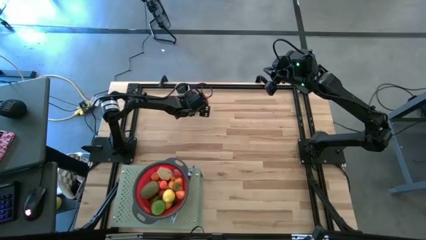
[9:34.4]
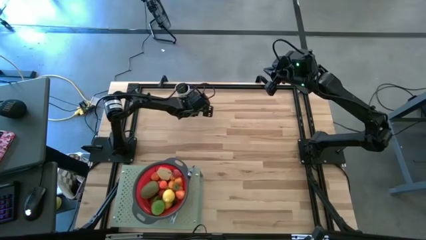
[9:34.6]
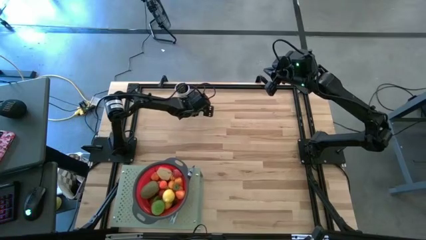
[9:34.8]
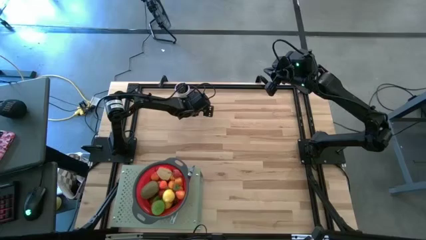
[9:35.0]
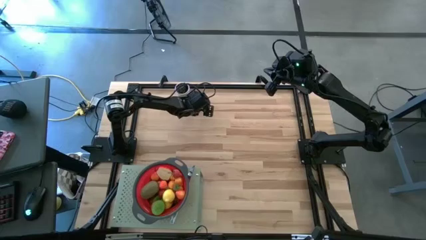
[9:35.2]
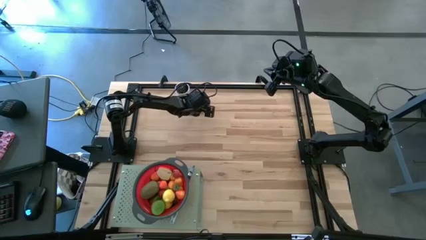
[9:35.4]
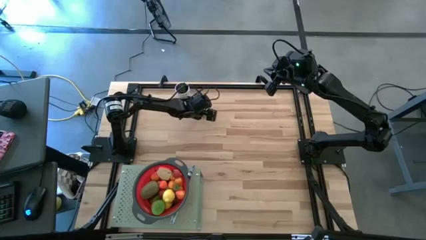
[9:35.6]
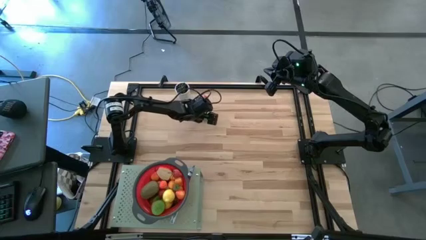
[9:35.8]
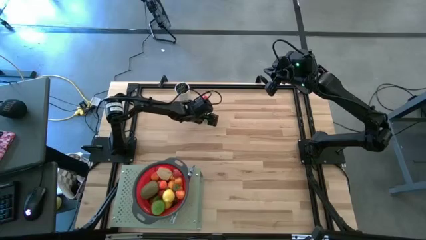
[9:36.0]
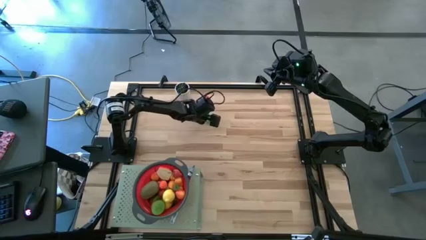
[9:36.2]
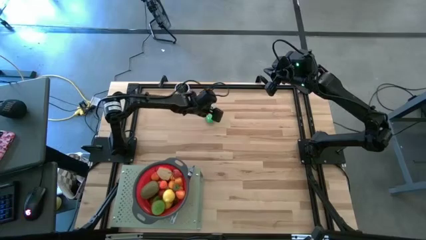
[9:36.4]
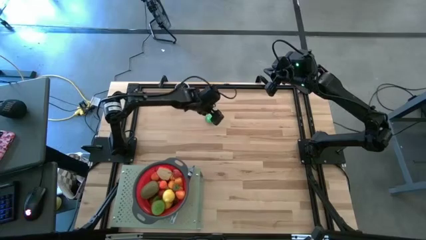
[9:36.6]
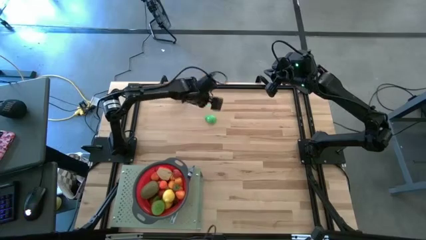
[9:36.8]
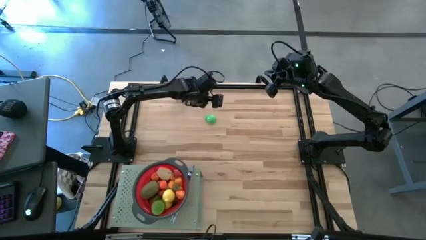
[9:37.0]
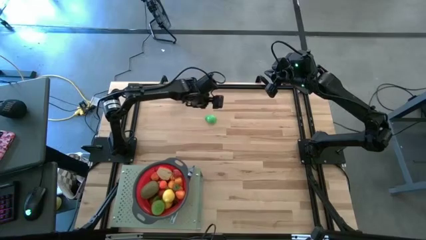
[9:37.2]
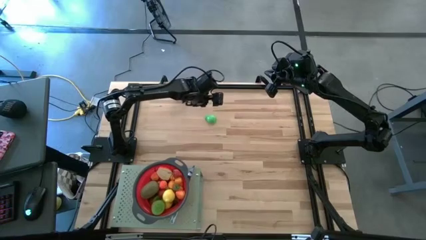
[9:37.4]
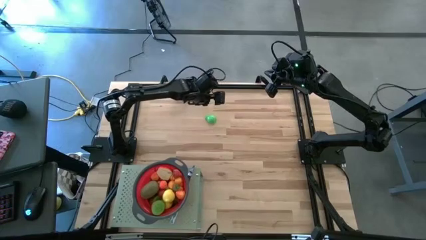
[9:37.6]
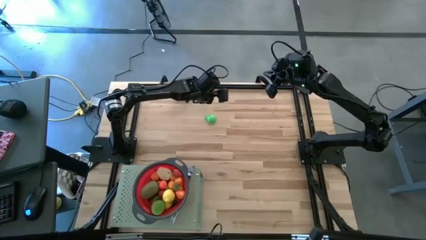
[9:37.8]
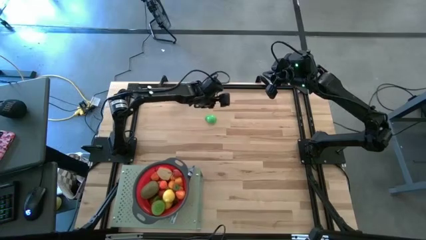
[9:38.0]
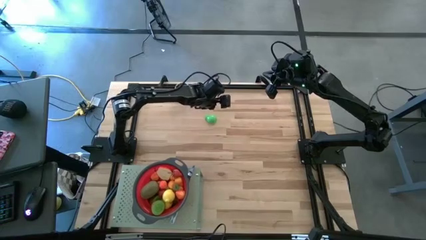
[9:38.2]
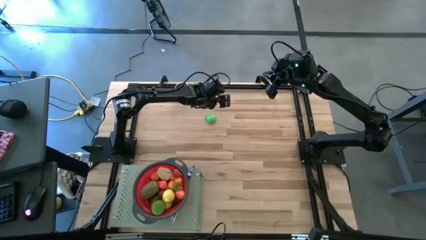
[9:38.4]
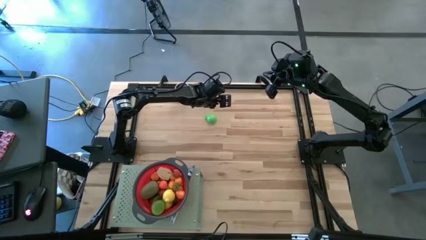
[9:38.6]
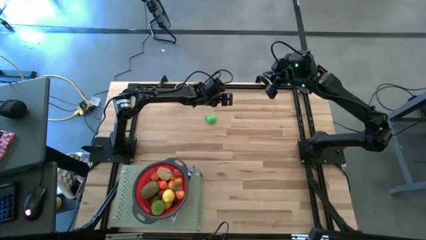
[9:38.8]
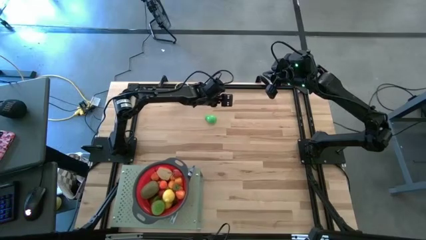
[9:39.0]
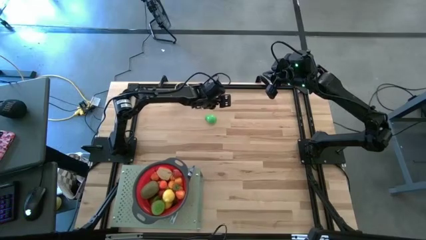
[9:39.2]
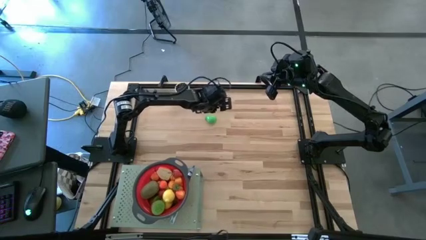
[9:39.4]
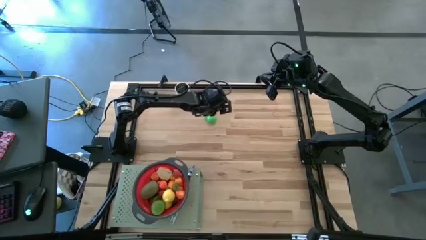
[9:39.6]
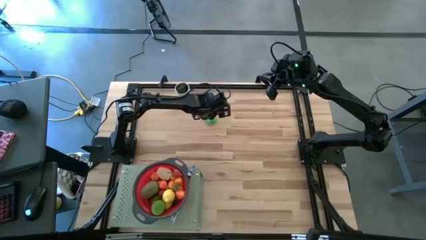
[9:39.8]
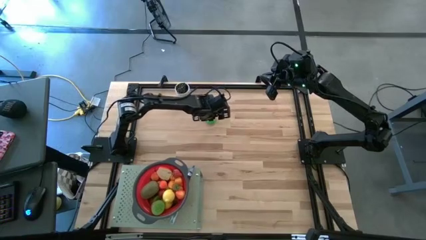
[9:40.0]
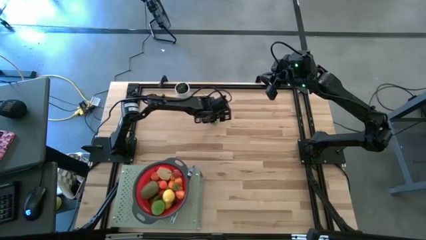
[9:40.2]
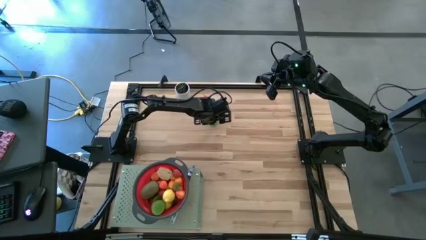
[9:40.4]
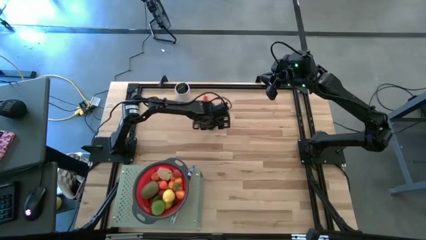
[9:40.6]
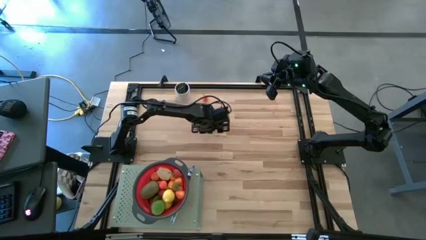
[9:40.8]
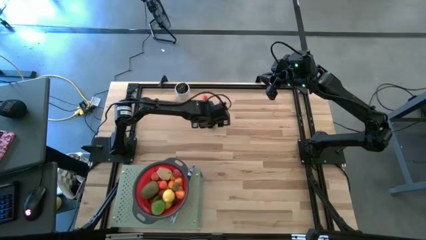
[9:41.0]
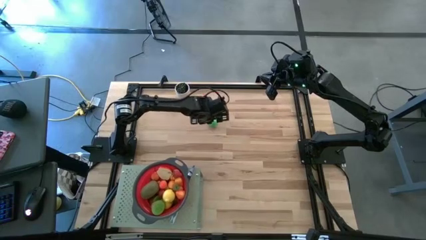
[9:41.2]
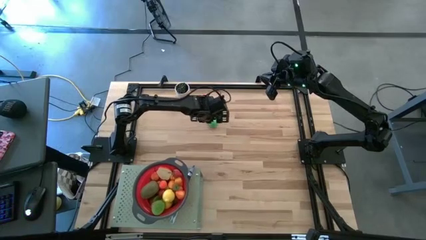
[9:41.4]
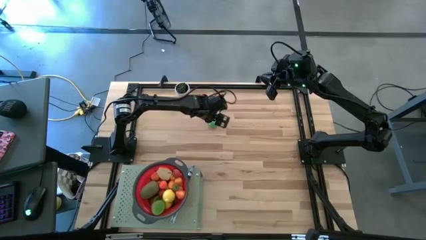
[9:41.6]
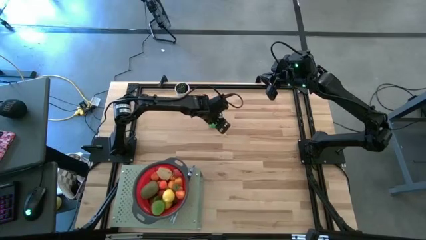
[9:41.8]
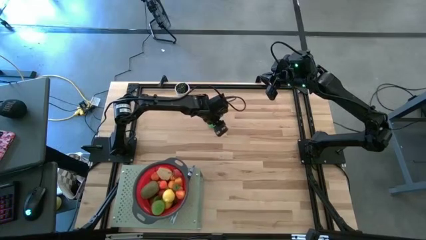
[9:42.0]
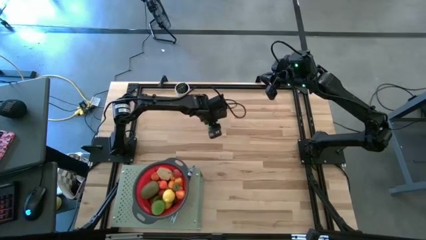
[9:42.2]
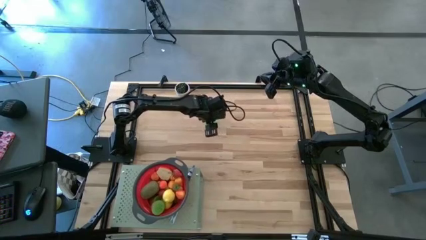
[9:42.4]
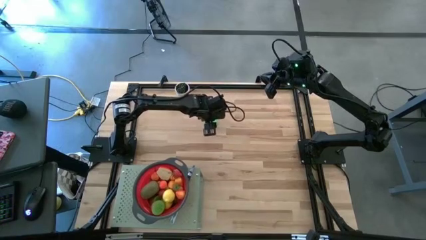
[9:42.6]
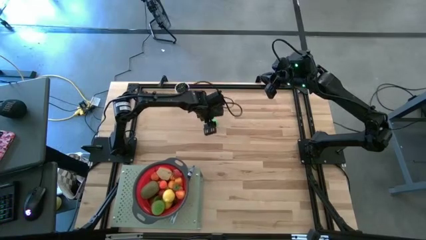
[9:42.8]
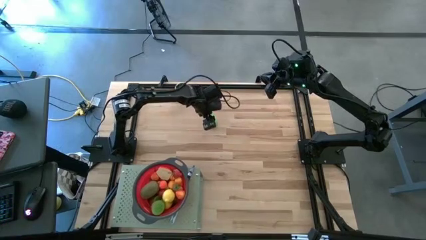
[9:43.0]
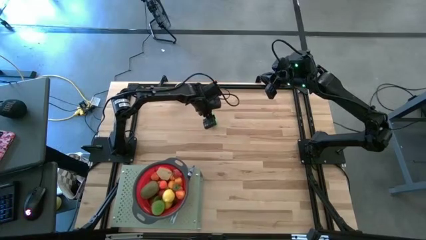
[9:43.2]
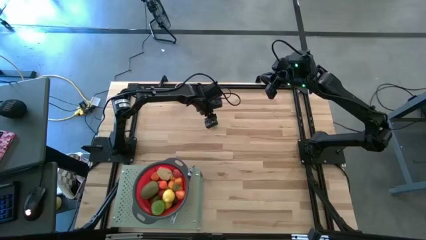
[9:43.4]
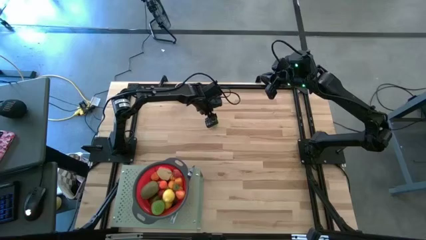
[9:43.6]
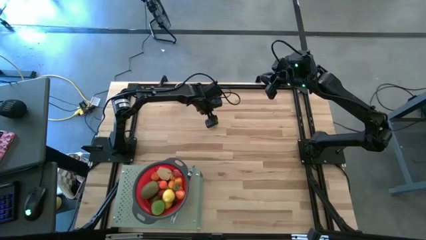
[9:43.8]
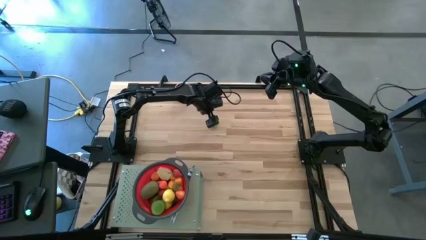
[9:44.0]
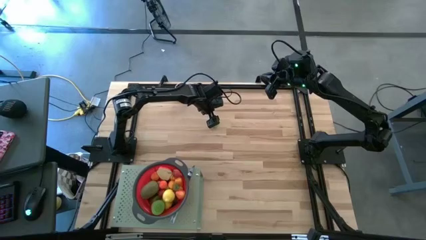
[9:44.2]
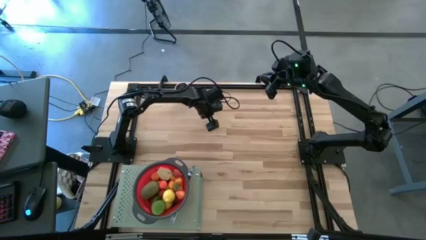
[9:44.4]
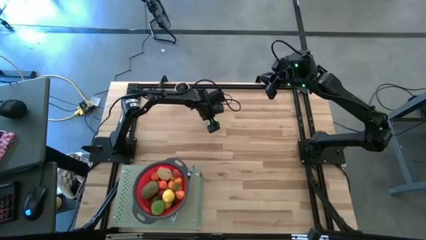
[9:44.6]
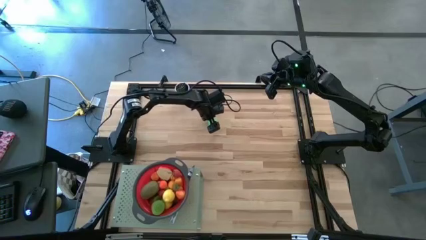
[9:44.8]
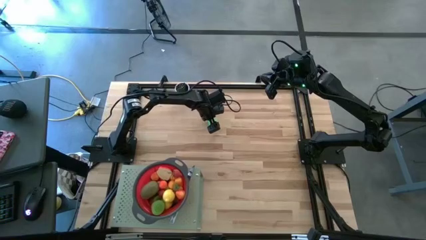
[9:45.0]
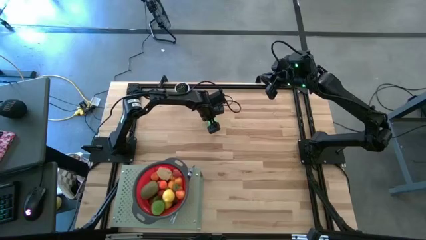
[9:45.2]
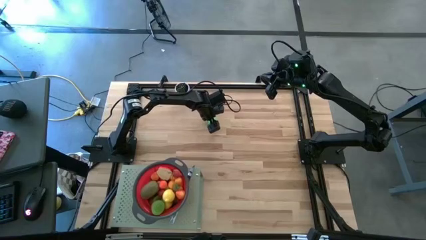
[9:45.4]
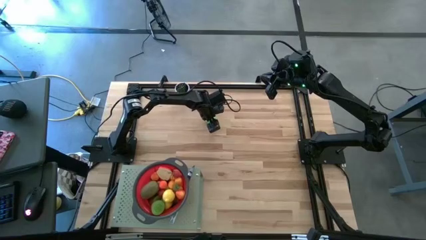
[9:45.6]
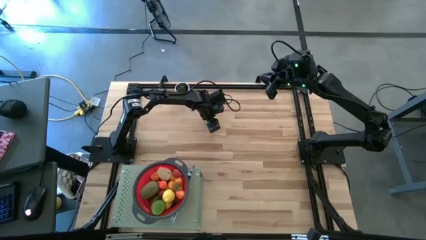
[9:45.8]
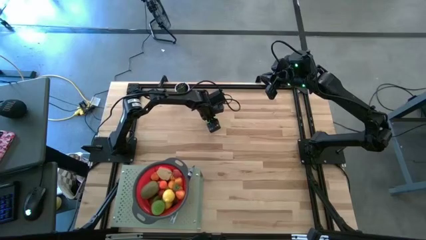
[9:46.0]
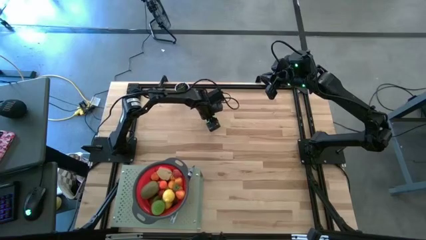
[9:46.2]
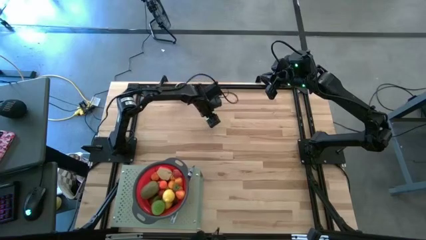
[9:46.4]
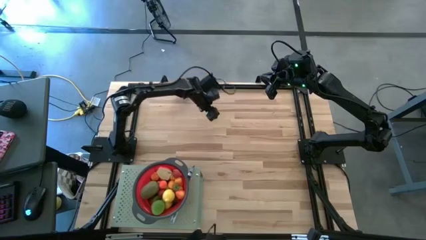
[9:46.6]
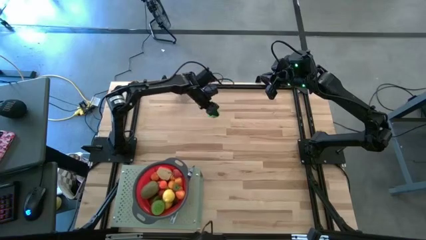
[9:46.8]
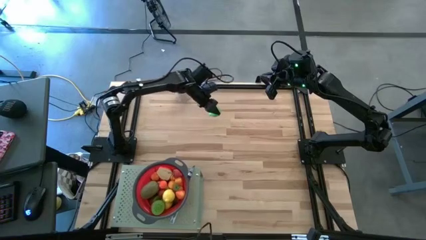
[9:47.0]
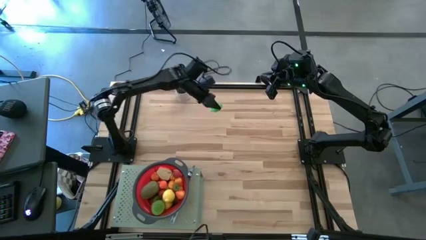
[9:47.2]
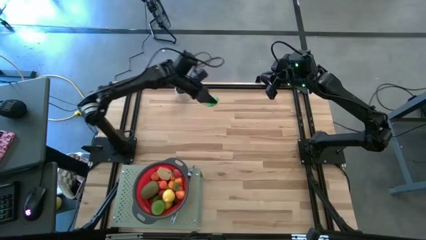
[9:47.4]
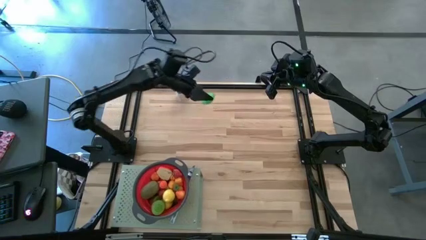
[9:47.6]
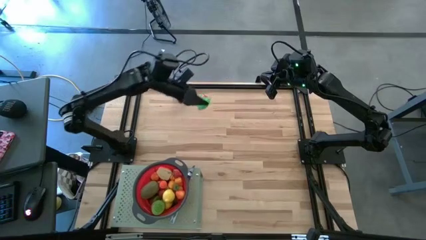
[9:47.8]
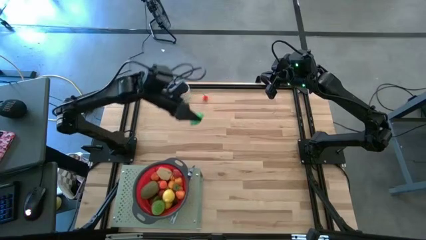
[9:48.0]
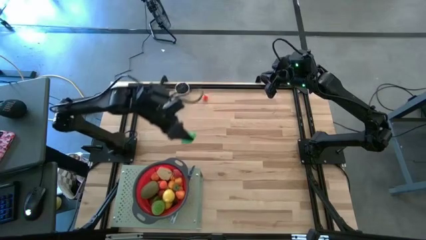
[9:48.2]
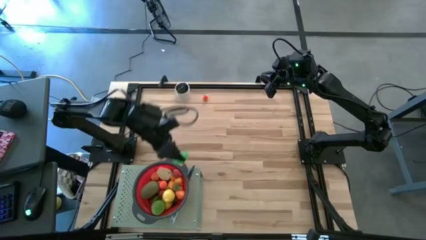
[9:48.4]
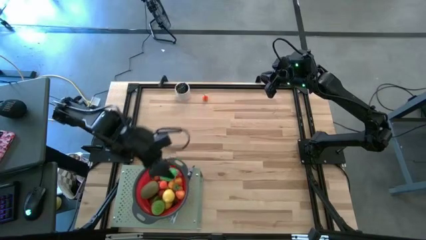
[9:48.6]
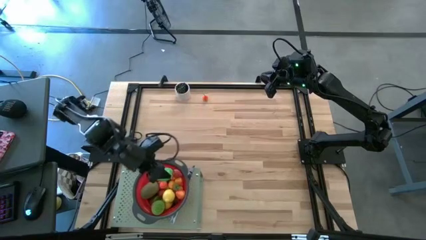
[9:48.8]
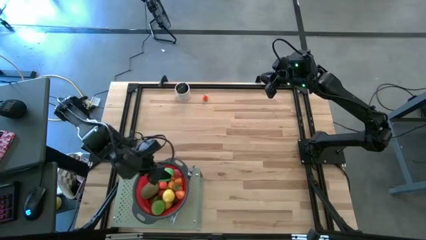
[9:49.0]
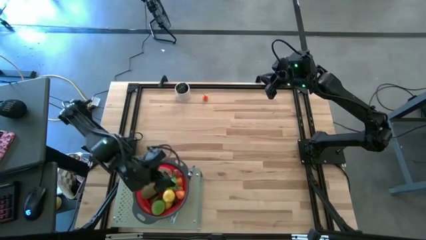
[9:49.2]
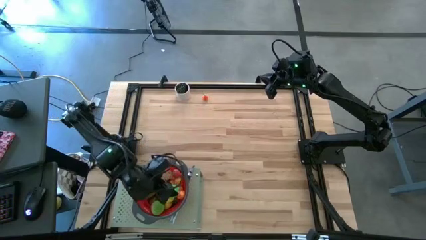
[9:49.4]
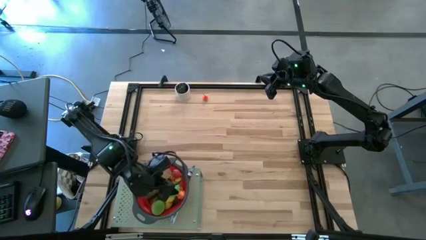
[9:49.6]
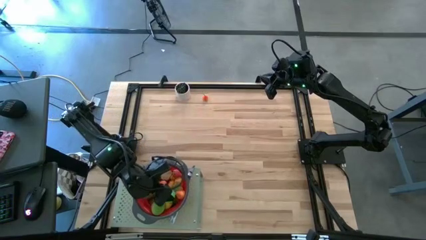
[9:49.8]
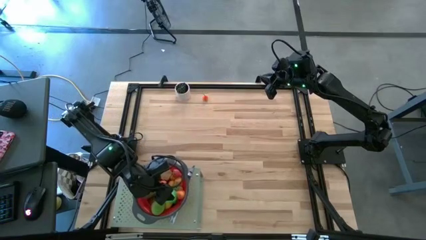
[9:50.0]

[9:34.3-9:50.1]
Task: Pick & Place Fruit
Put the half avocado into the red strainer bowl on the shelf
